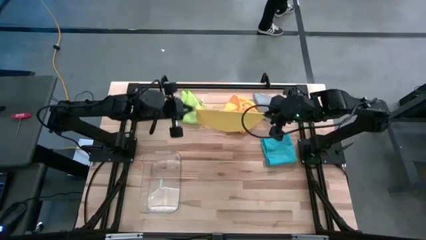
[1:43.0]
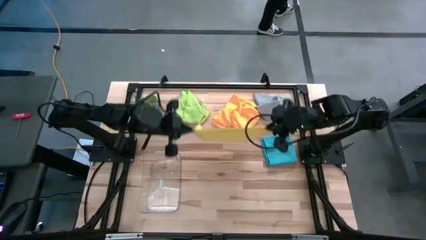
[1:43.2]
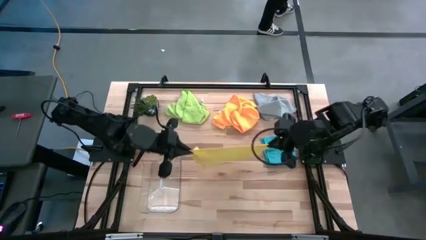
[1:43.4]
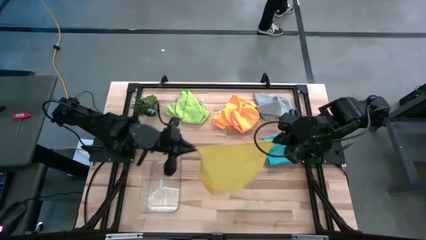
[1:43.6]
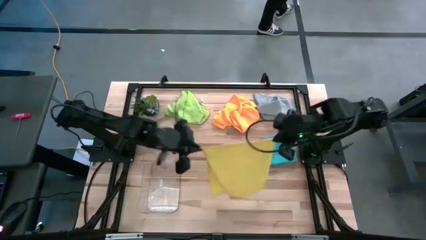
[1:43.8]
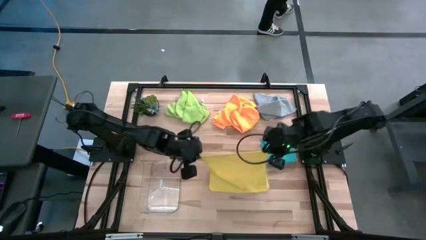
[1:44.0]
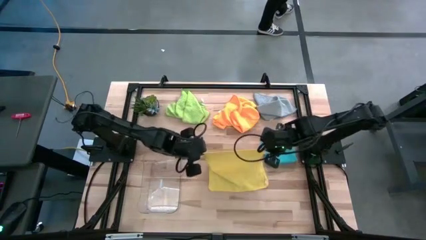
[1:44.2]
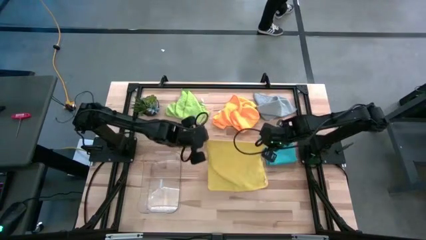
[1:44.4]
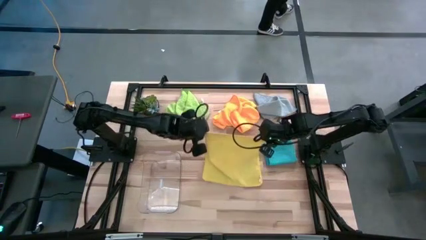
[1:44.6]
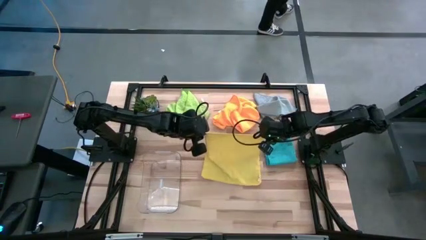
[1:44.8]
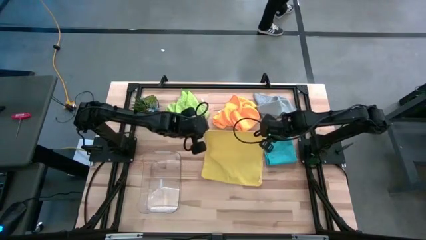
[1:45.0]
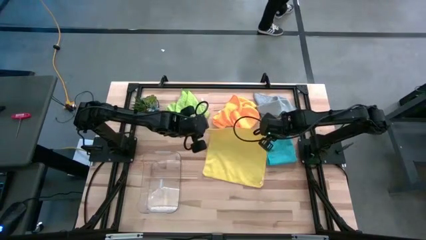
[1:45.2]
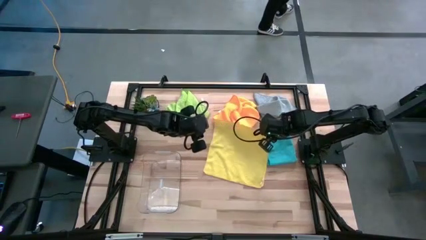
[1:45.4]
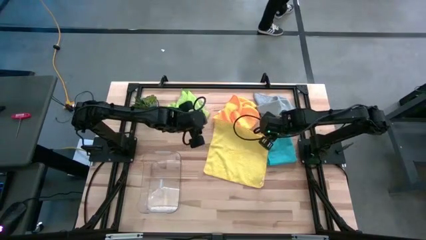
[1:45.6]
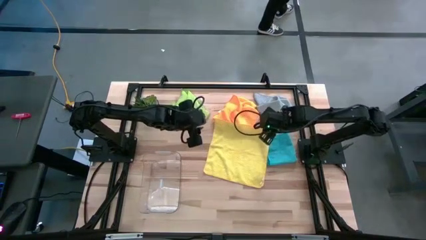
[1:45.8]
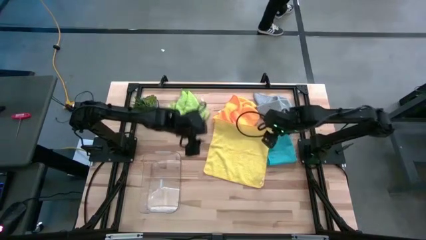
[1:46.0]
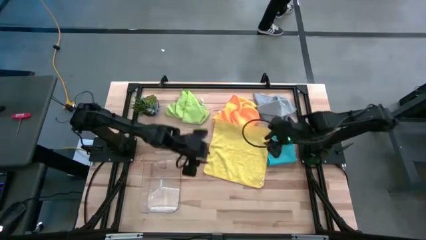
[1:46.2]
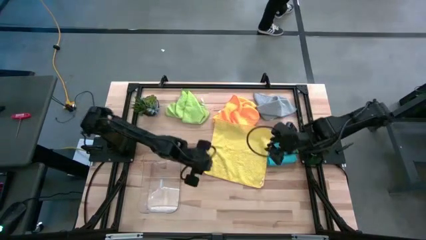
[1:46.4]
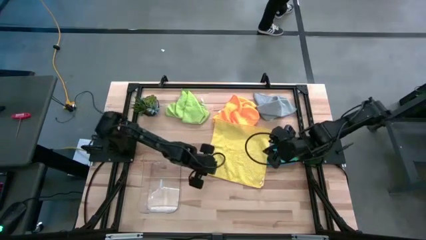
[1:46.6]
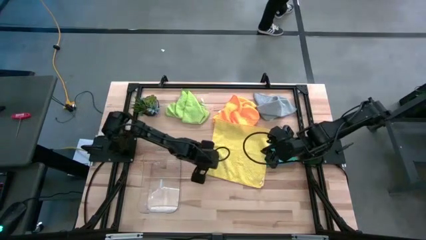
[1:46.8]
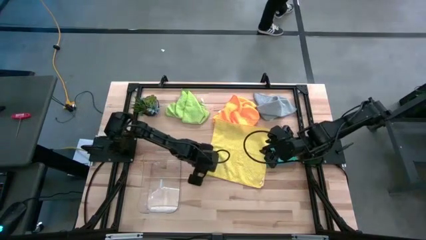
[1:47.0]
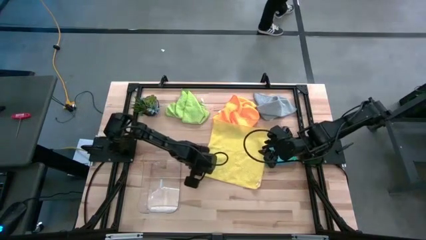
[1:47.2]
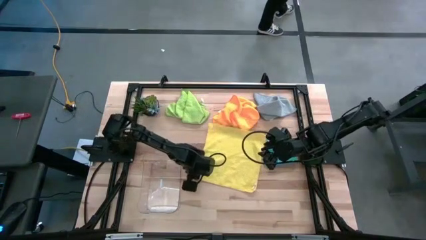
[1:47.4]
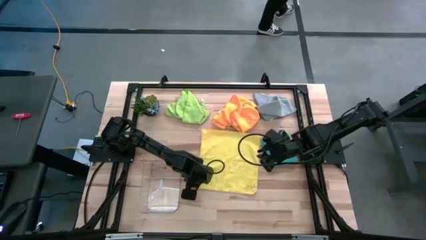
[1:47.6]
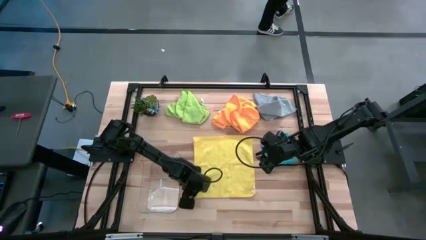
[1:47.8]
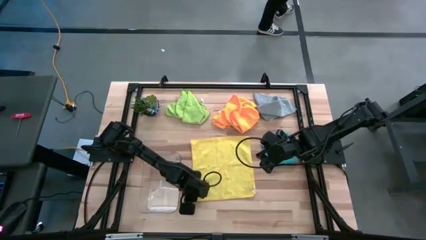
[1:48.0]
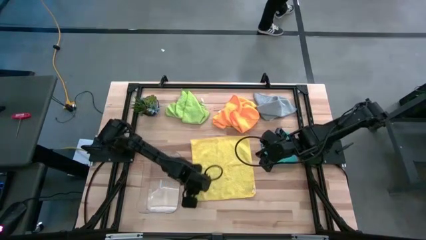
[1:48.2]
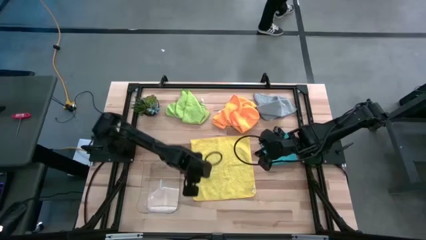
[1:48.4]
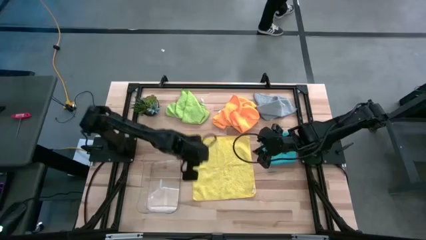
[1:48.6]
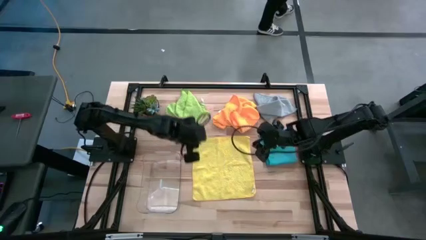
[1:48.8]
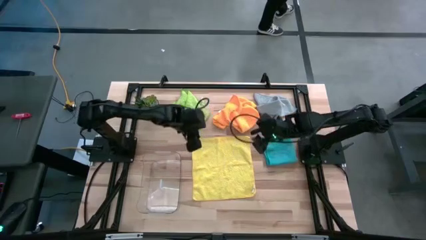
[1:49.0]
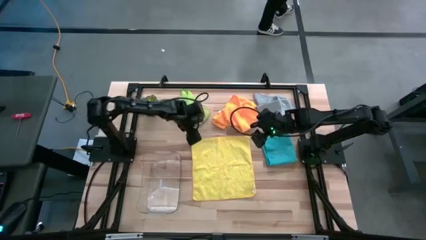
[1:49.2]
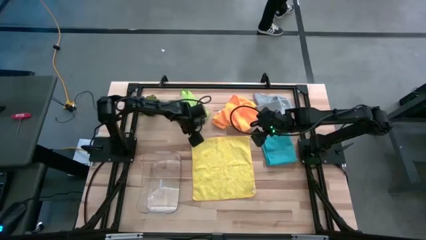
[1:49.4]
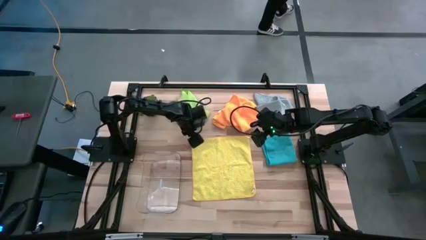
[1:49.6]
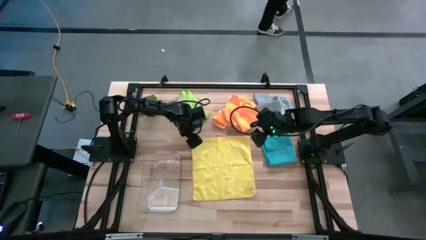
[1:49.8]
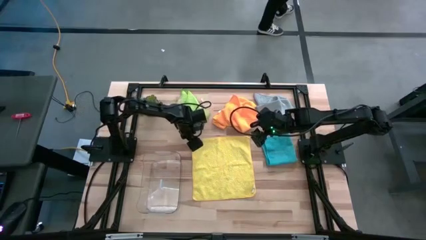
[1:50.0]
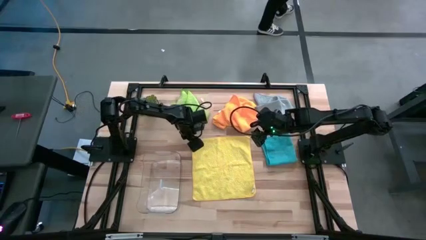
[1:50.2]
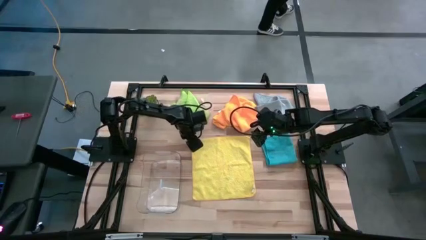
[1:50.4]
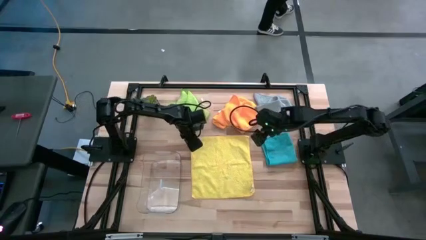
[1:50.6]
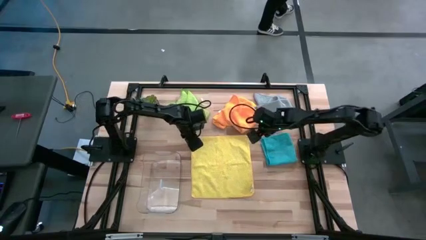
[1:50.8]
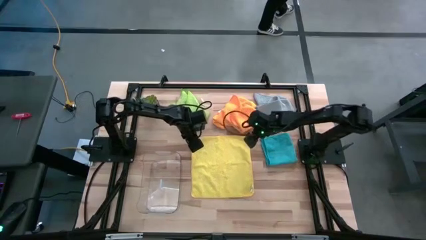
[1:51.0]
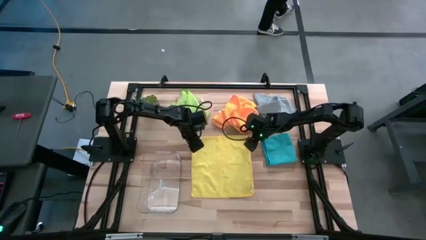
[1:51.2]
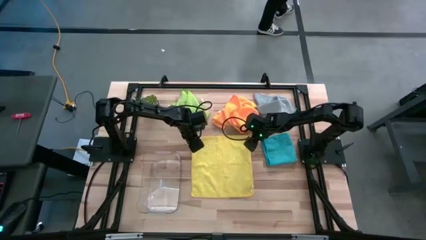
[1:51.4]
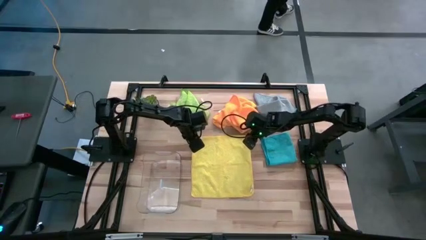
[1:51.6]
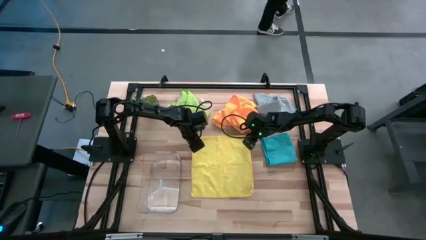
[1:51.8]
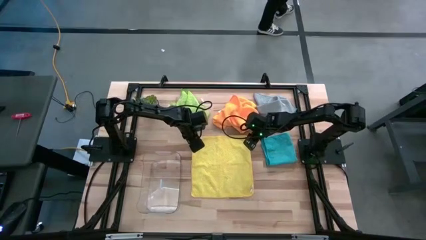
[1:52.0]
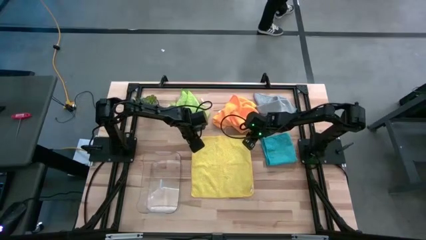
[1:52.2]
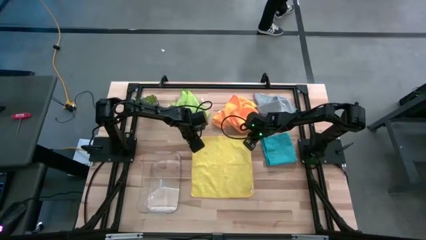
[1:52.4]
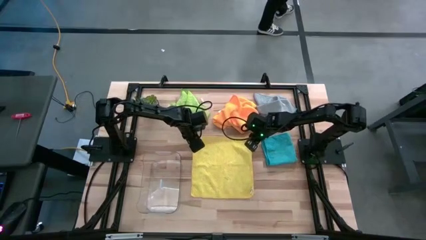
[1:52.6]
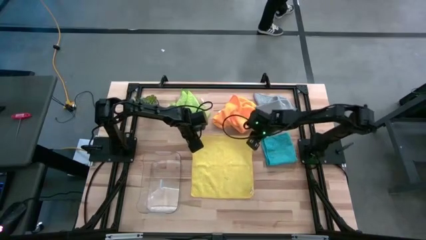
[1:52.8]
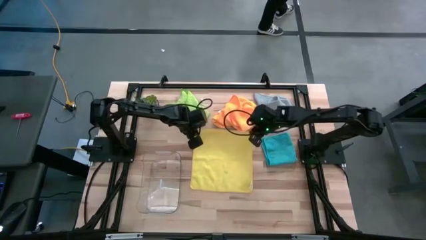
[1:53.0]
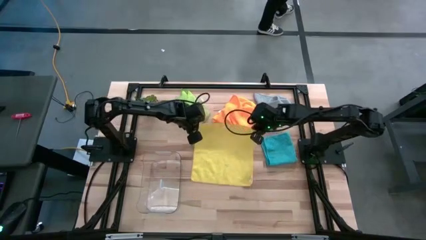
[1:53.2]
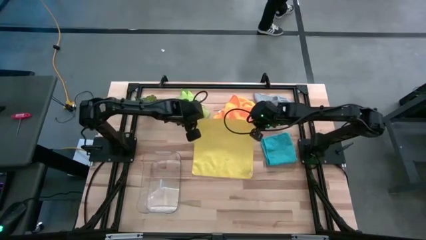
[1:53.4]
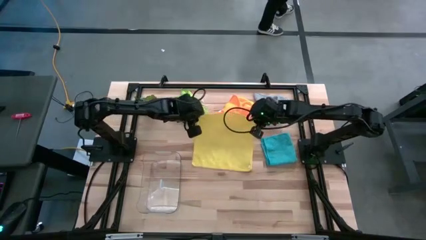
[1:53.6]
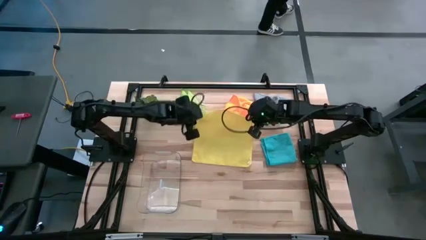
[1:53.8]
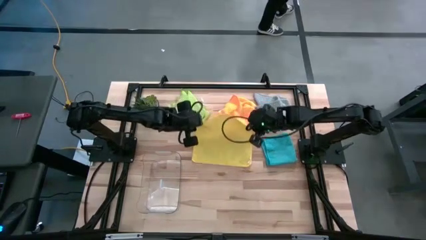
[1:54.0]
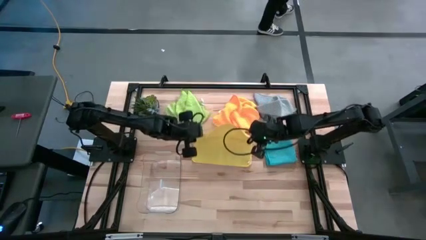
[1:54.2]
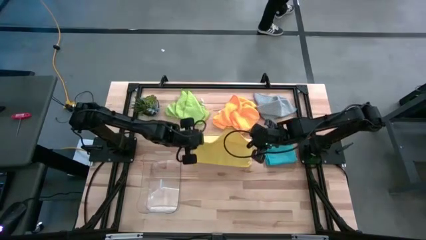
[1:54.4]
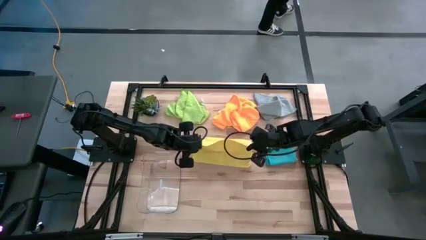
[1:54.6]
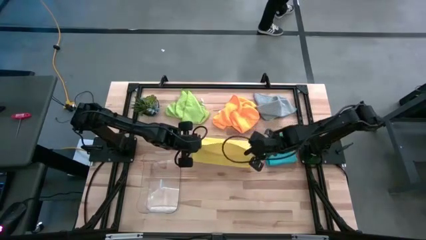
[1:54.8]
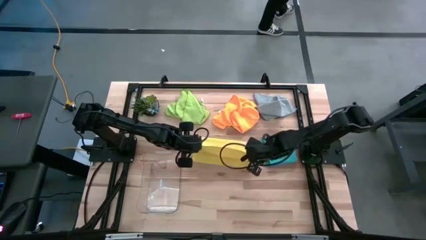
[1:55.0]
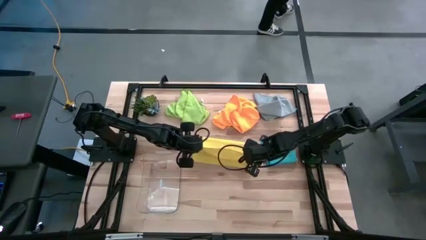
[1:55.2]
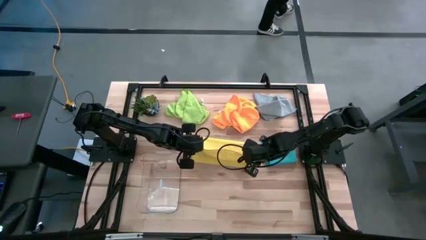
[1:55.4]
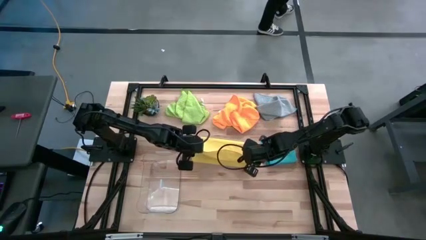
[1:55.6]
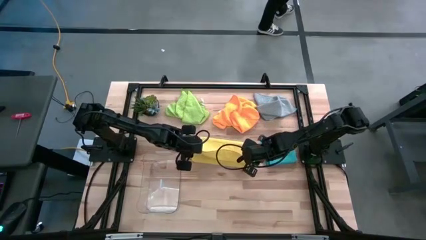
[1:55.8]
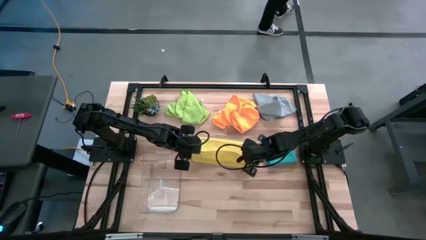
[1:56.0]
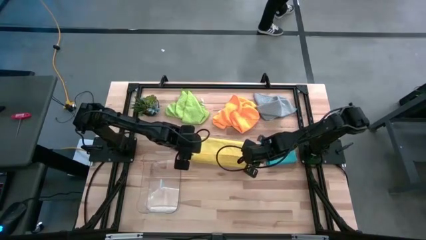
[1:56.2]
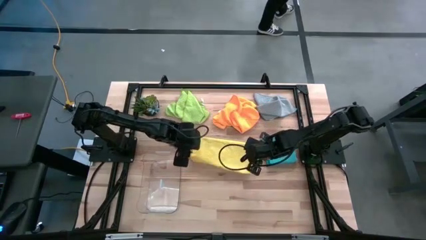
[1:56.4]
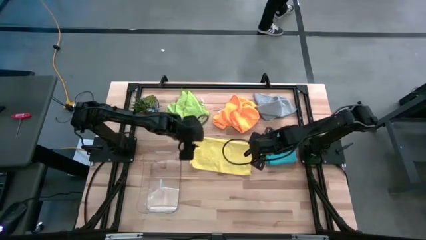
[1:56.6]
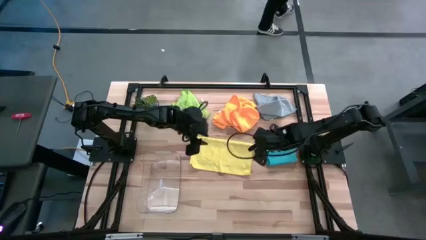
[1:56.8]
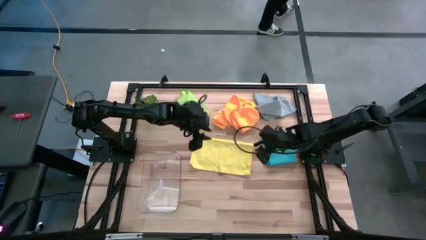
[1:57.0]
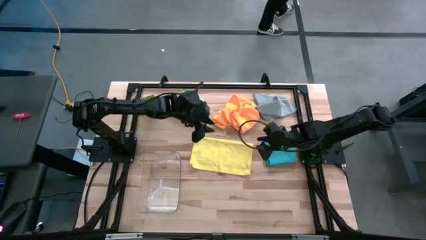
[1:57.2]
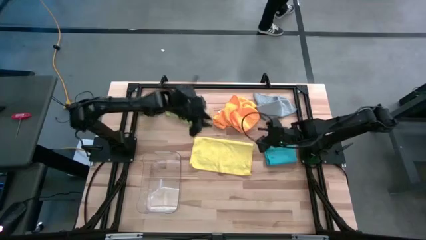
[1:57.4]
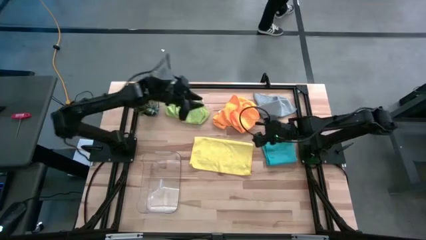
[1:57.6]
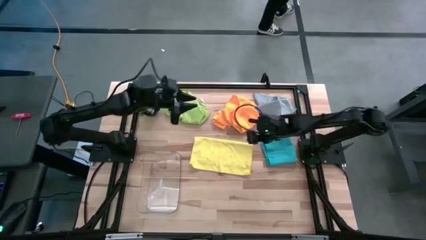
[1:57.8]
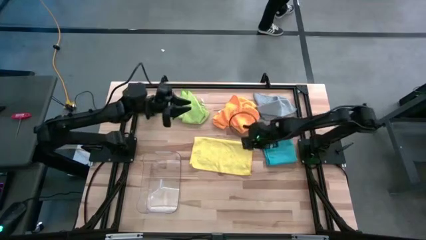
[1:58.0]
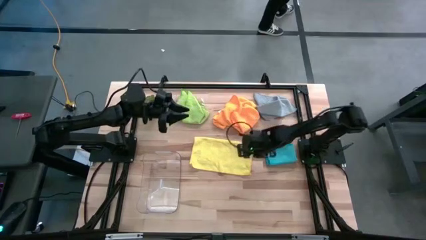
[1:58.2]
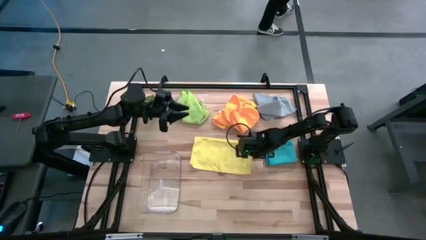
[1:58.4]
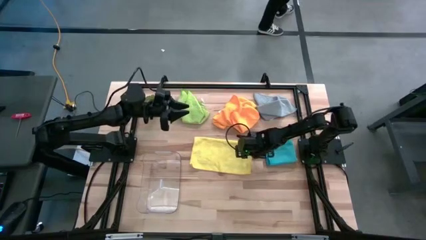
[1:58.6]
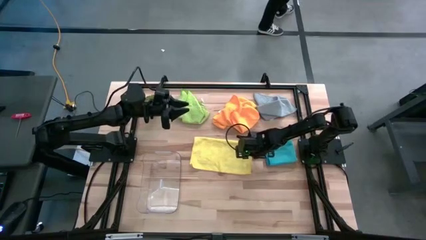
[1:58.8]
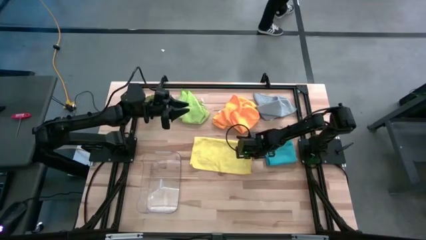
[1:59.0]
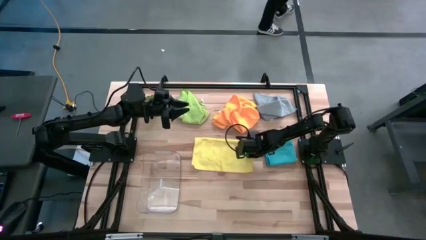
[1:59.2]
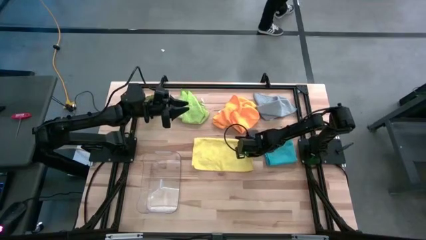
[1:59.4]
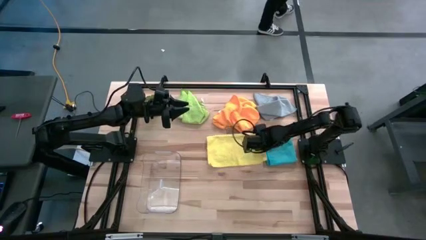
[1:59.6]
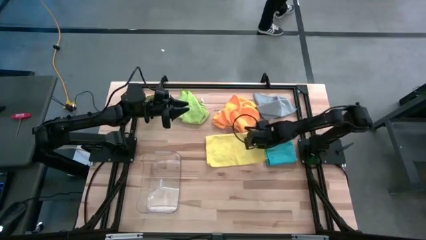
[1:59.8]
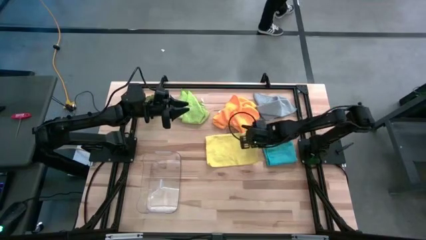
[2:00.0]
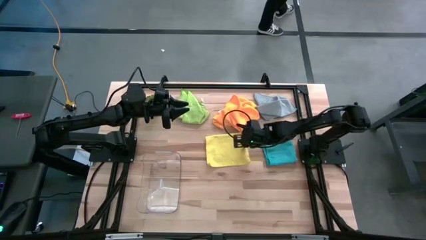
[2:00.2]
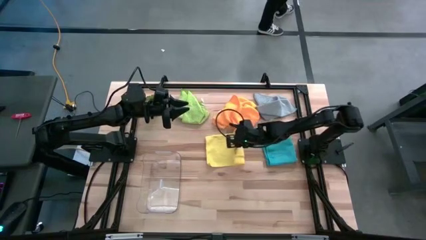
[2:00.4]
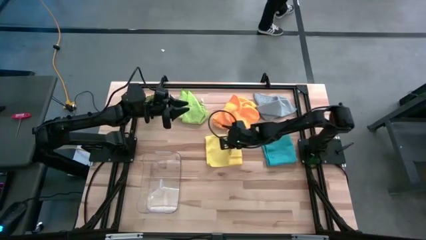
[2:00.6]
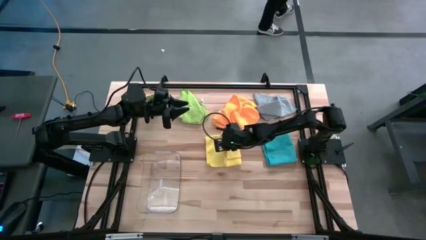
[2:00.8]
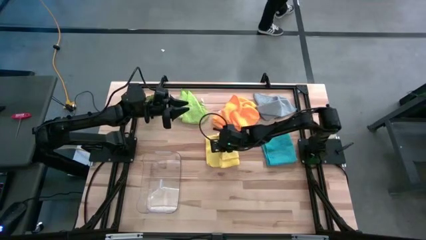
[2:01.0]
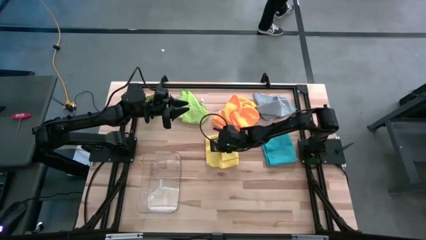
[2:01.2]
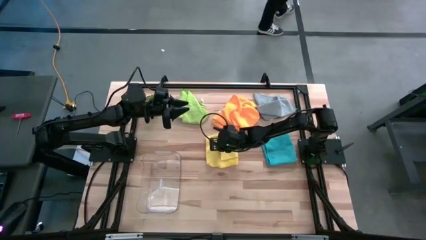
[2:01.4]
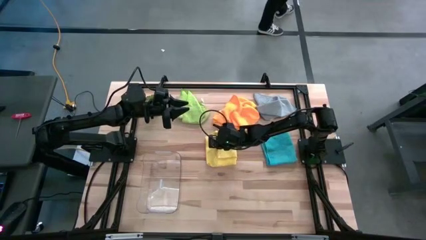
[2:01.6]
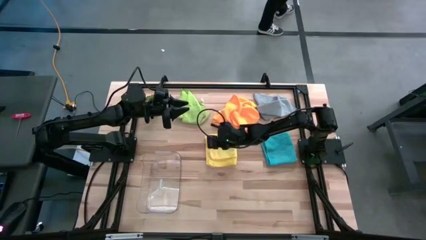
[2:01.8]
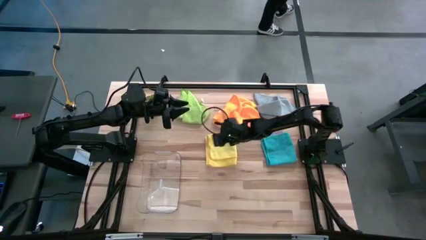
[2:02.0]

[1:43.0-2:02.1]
Task: Fold microfiber towels
Fold the yellow towel
